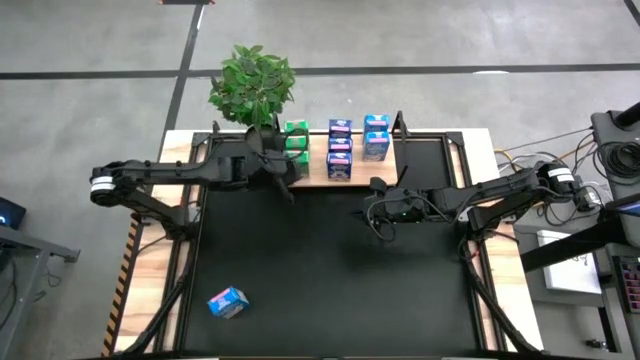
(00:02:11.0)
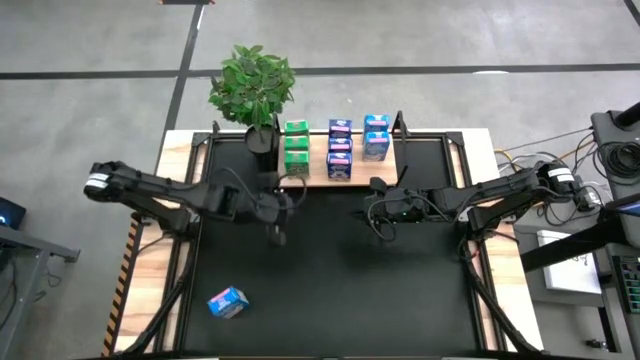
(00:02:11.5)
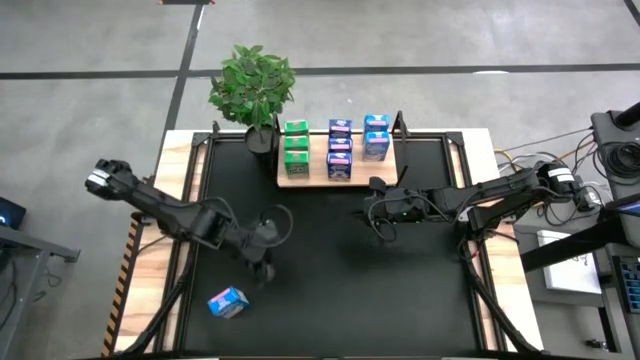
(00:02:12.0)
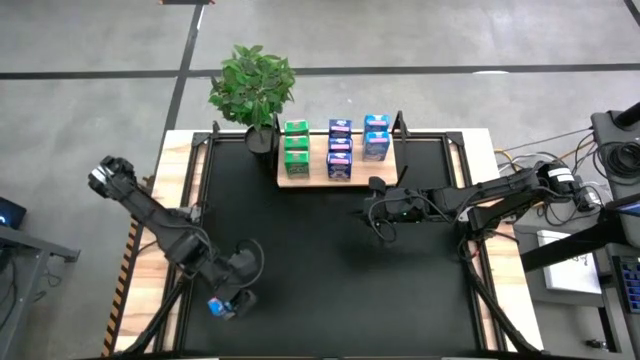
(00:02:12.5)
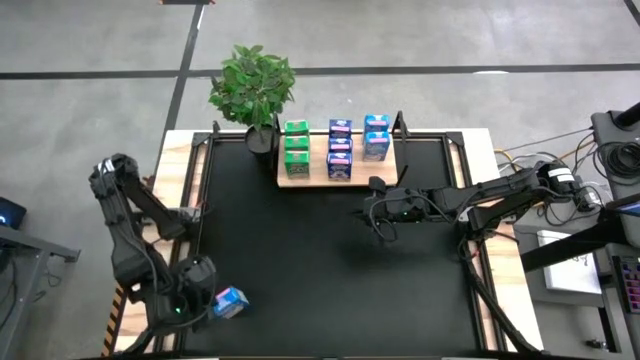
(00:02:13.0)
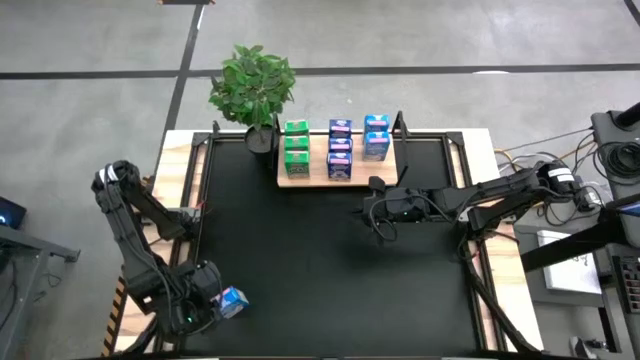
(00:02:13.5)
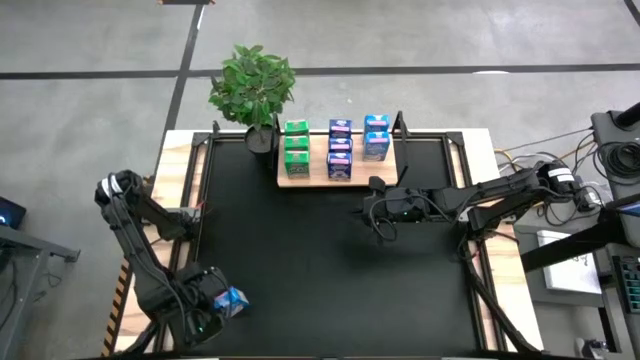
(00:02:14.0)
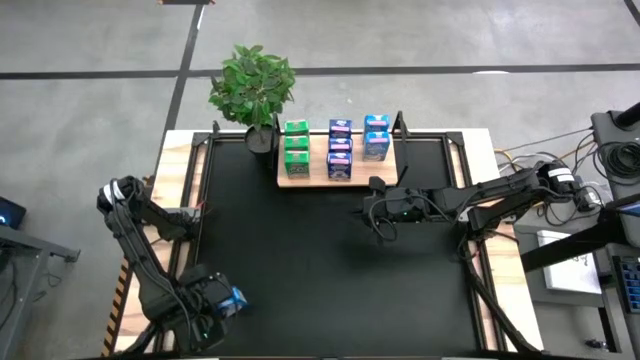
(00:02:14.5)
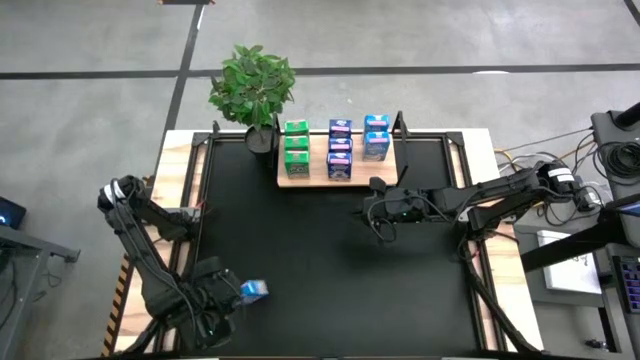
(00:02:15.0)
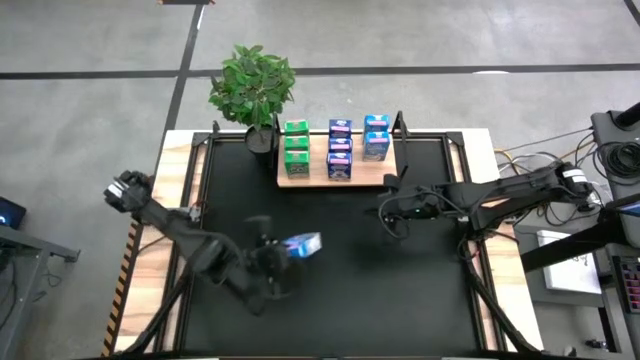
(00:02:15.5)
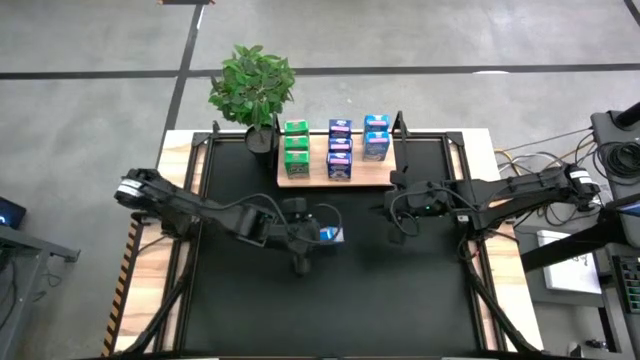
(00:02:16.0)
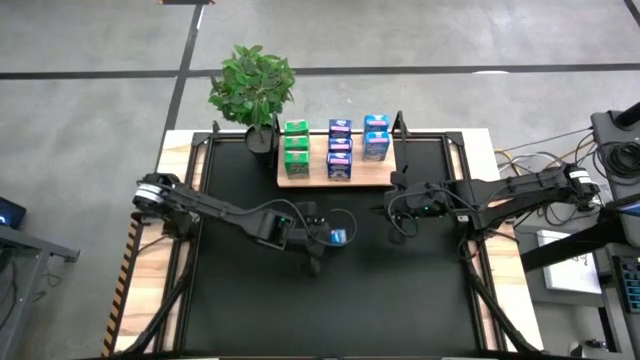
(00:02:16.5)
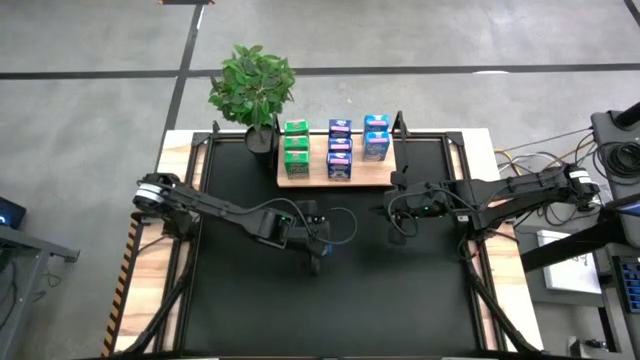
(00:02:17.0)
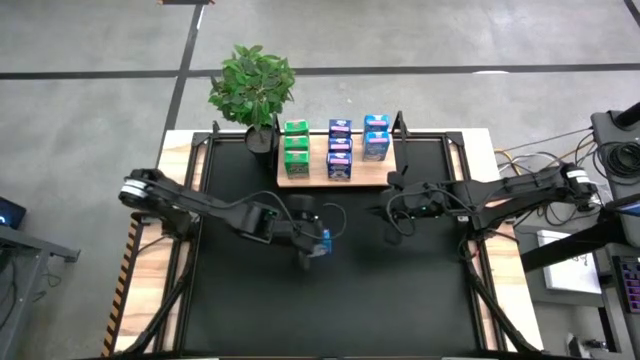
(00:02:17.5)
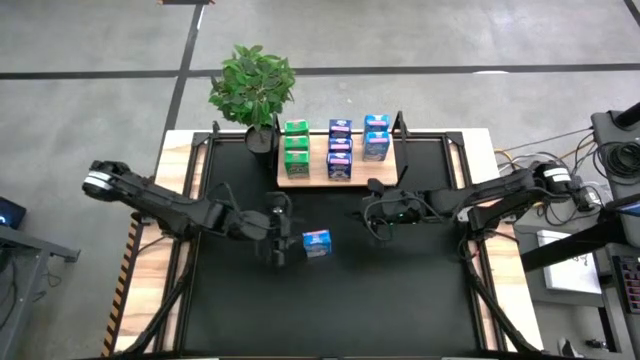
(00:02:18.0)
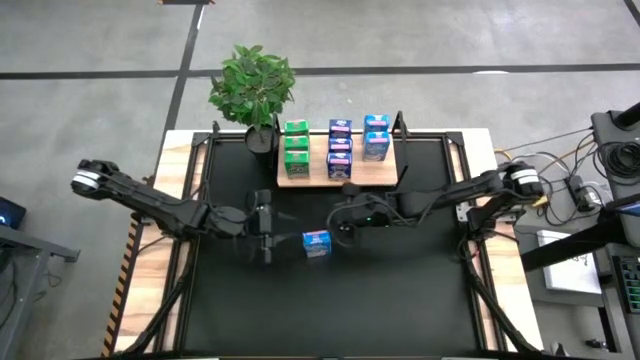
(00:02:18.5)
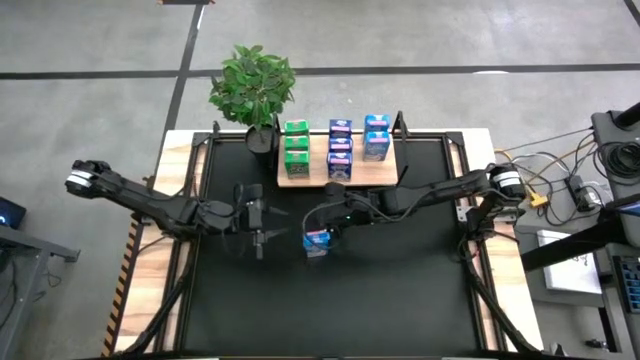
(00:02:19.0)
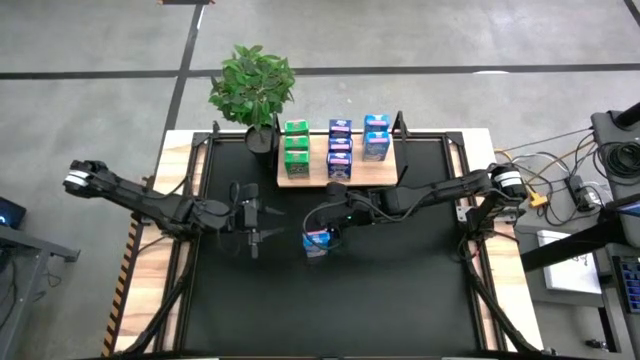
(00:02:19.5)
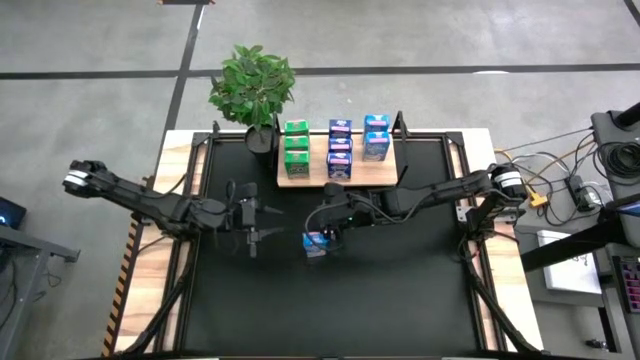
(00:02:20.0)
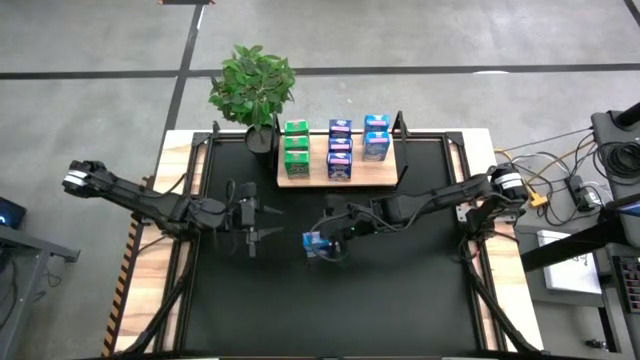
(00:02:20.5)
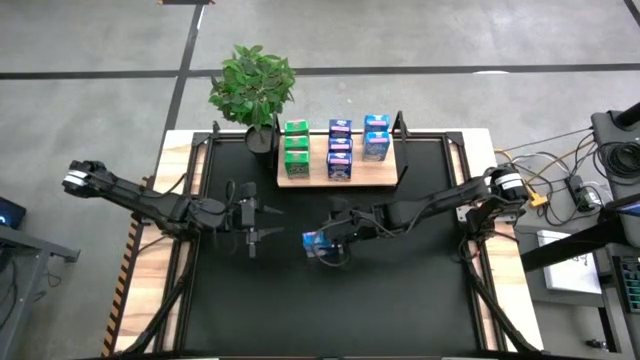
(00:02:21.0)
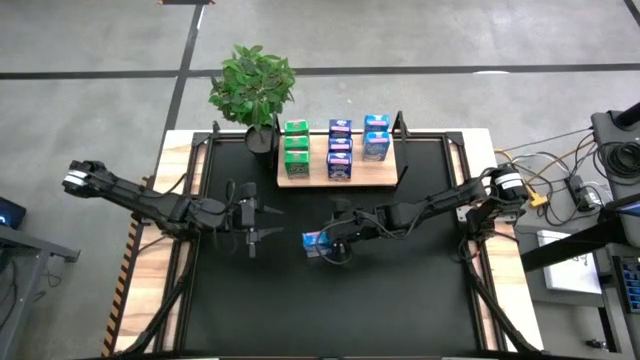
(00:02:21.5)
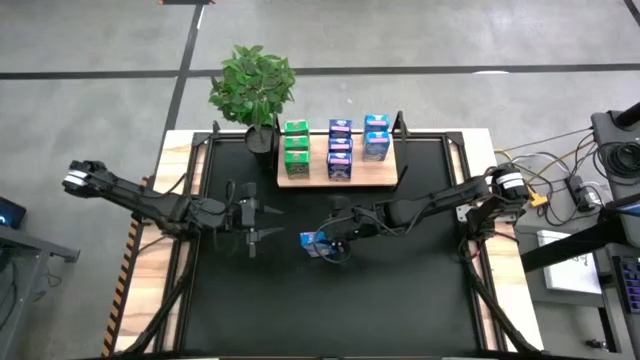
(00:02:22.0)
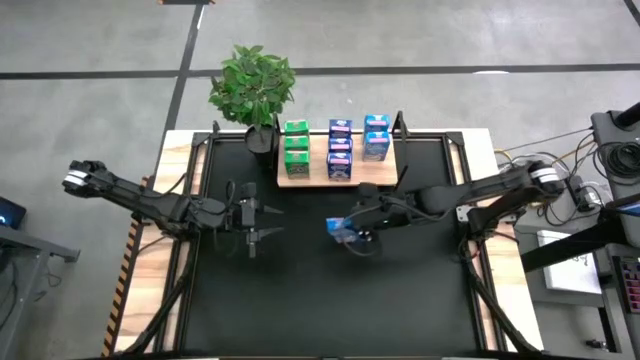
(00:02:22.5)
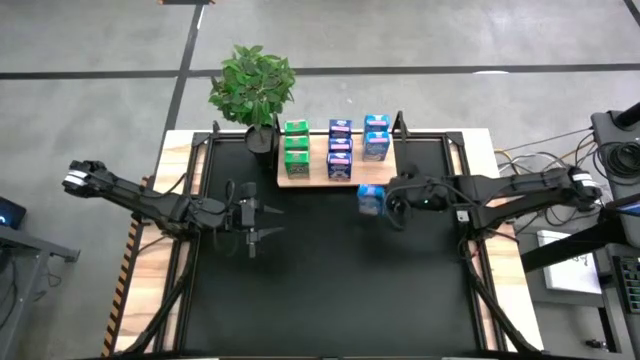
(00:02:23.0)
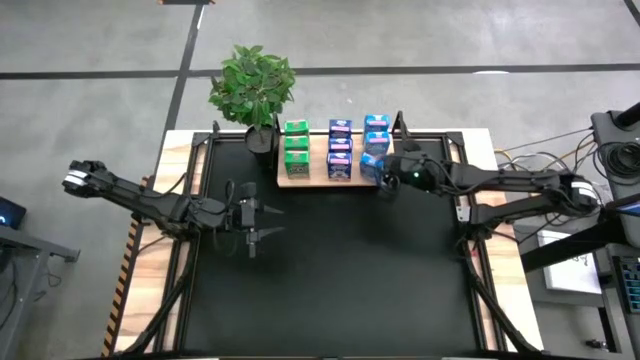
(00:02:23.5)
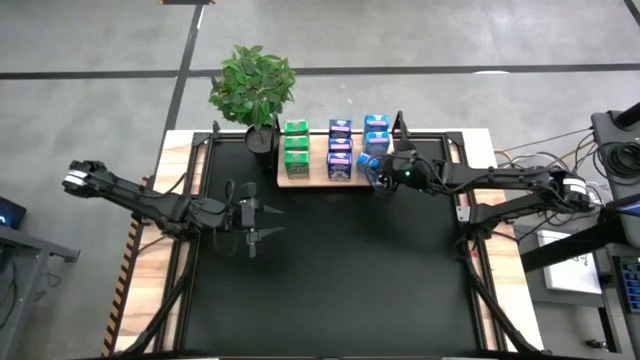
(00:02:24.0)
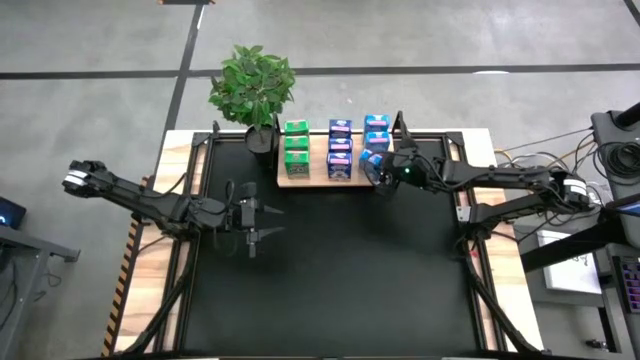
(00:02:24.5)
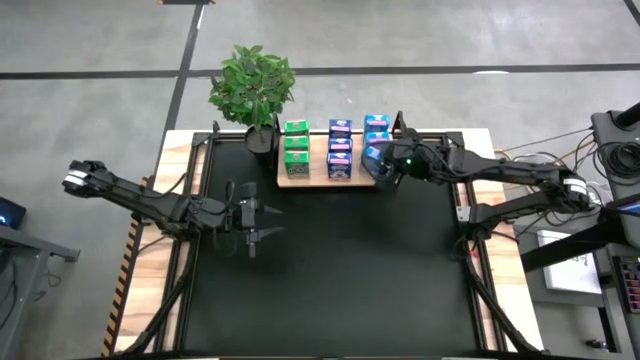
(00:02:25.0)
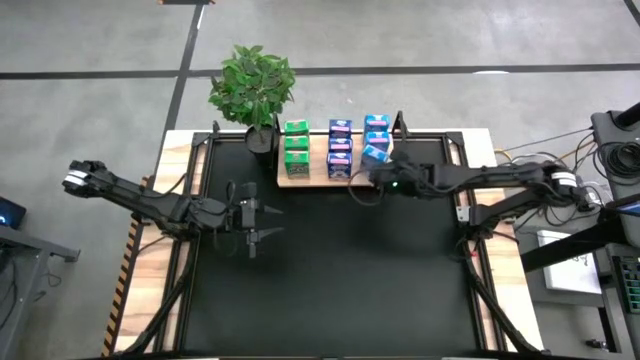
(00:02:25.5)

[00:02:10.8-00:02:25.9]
Task: Stack cereal on shelf
Put the light blue cereal box aligned with the light blue cereal boxes on the shelf

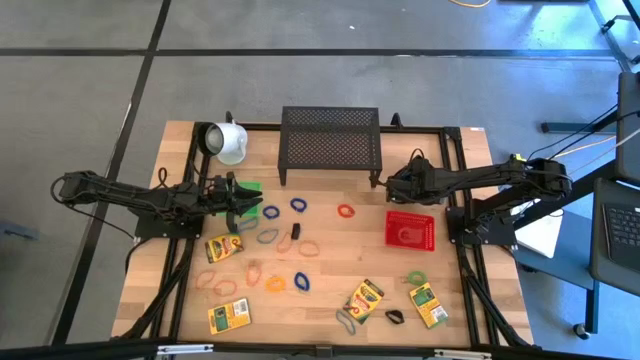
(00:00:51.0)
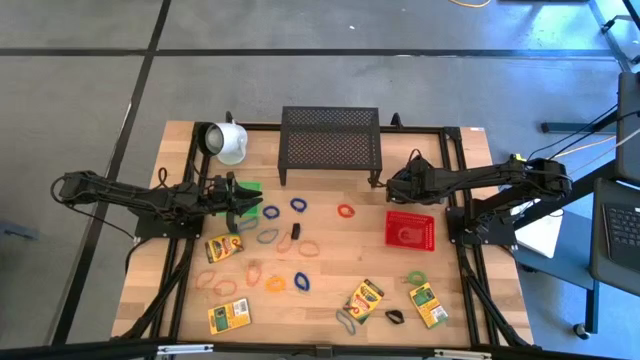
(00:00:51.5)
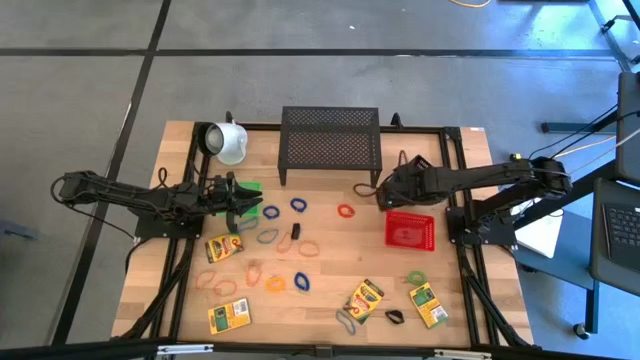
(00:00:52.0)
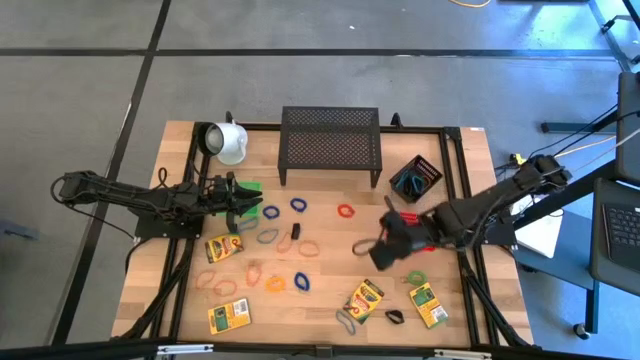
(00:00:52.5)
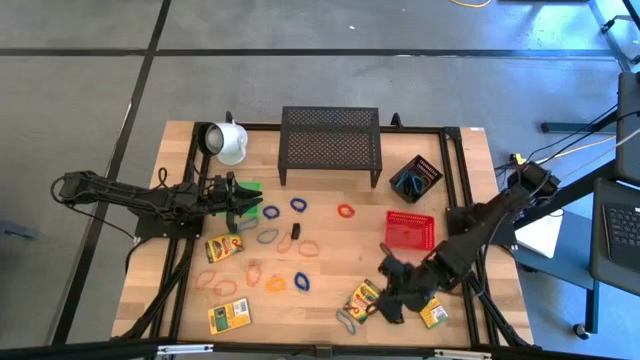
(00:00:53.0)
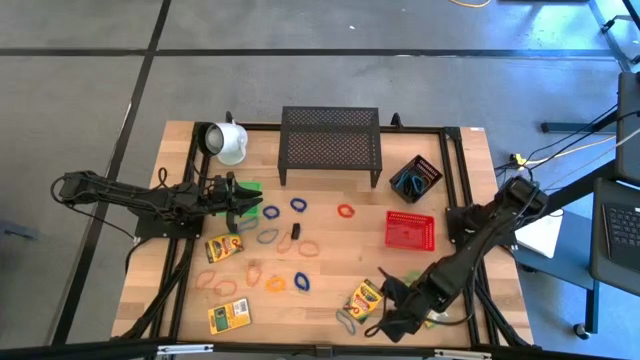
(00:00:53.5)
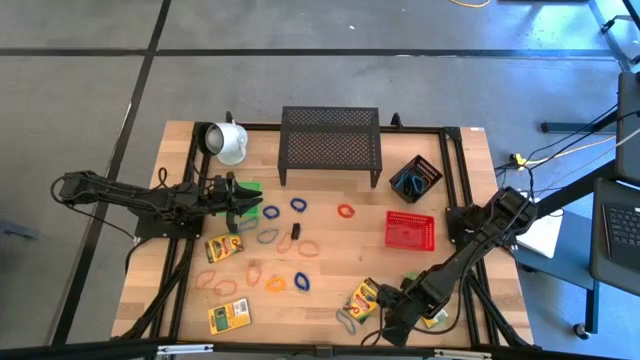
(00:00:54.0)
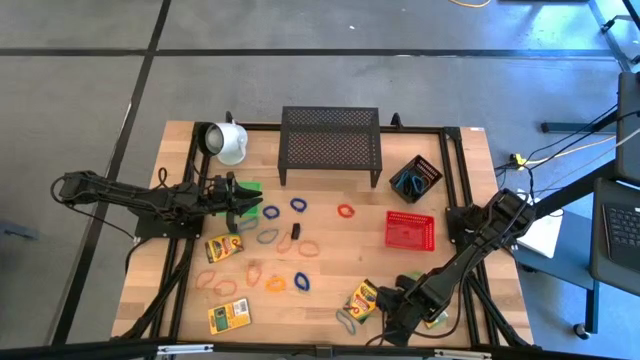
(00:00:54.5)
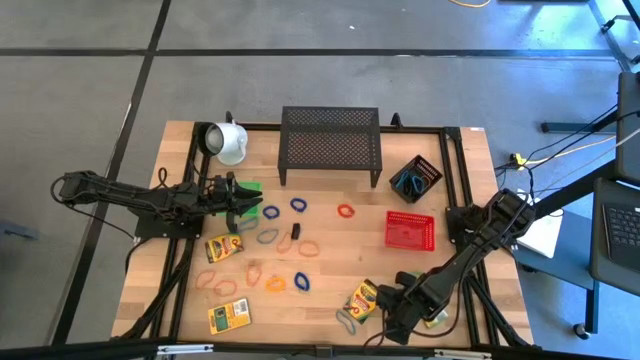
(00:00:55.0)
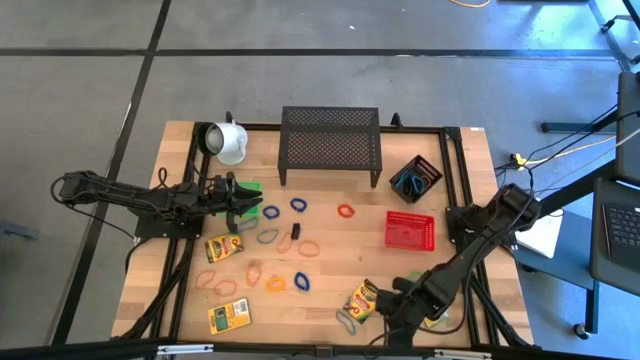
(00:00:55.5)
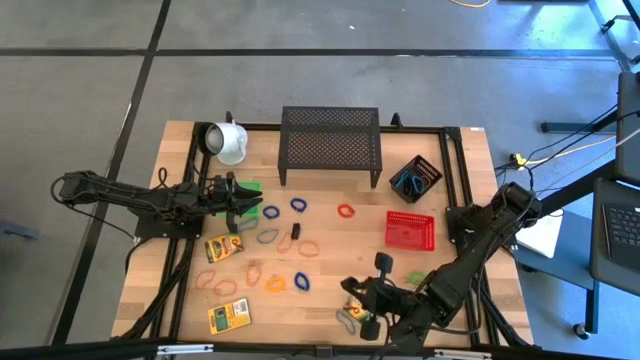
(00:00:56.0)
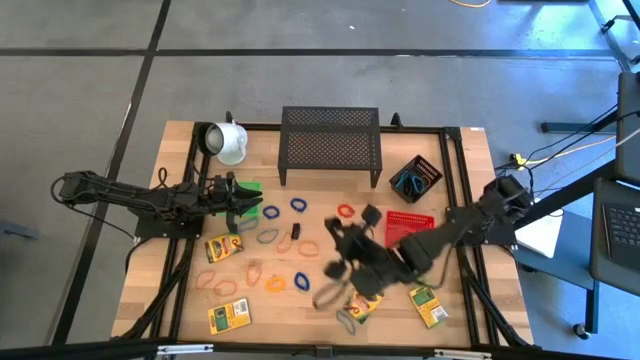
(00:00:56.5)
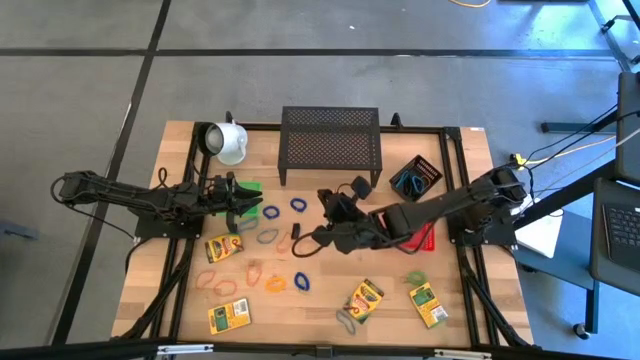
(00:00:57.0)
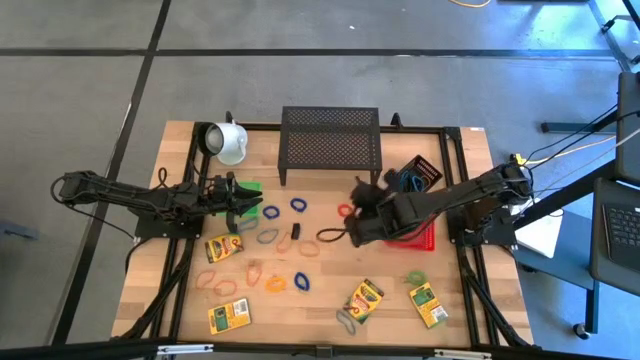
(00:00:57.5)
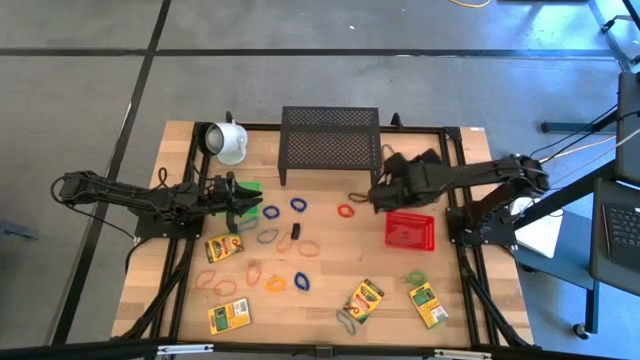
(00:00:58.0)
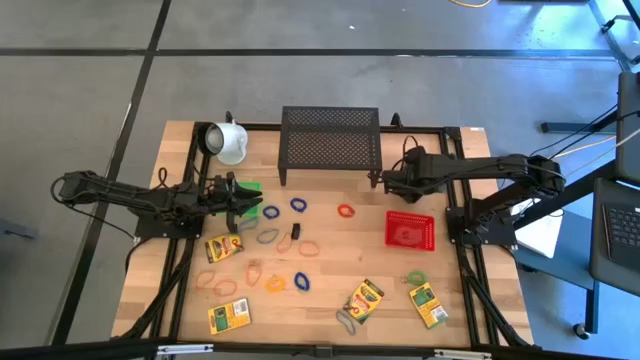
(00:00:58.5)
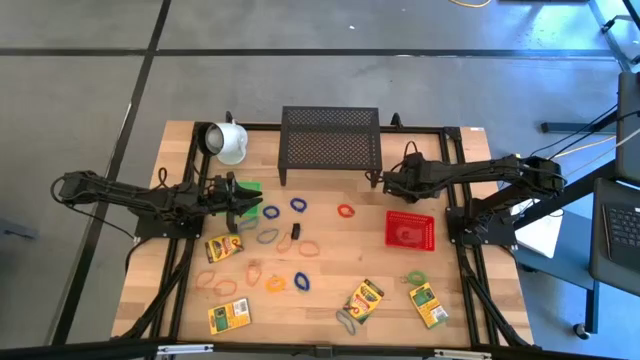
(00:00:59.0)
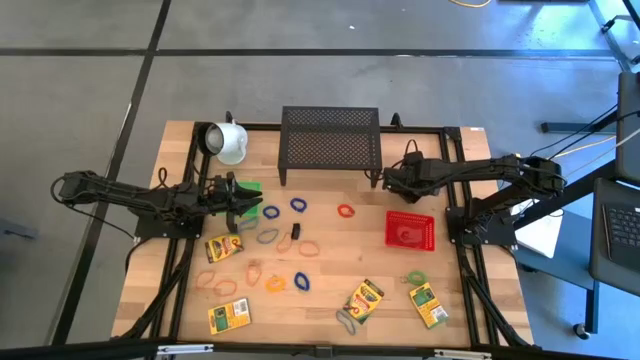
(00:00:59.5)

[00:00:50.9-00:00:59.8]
Task: Pick & Place Office Desk Supplies
Put the black rubber band into the black bin
